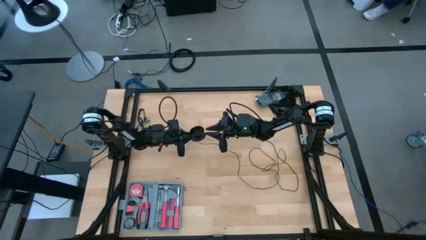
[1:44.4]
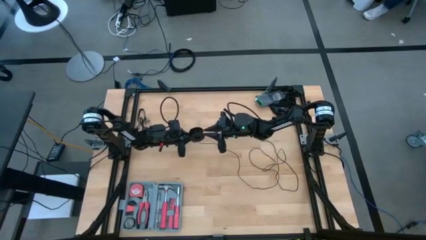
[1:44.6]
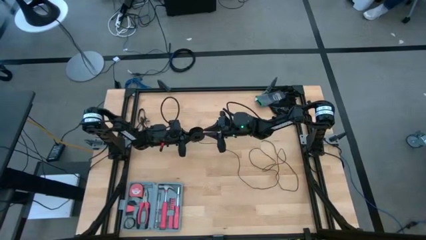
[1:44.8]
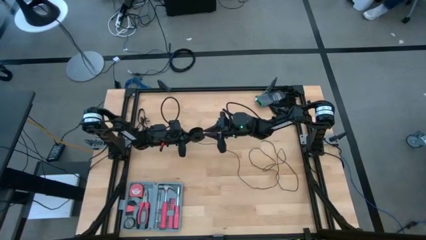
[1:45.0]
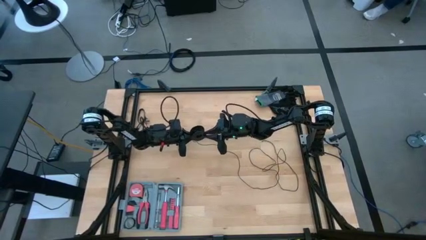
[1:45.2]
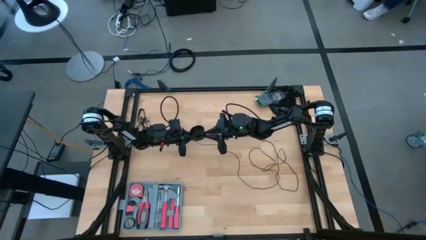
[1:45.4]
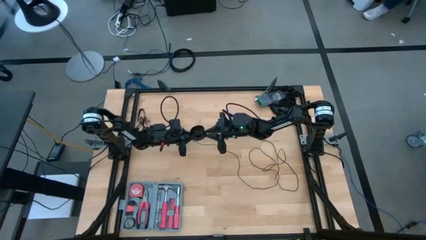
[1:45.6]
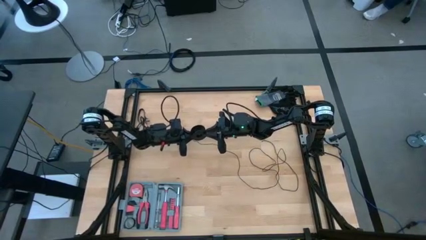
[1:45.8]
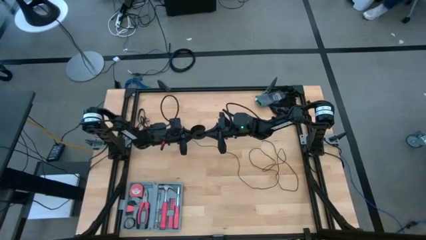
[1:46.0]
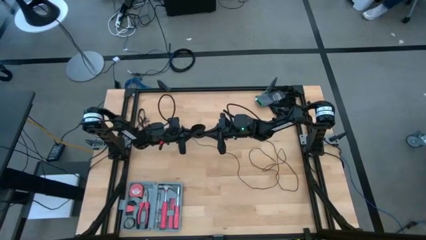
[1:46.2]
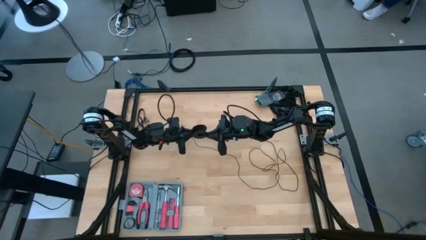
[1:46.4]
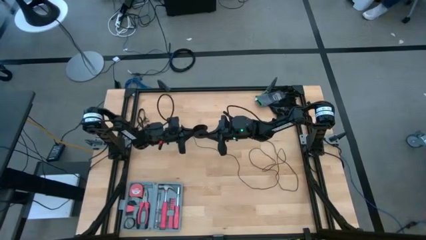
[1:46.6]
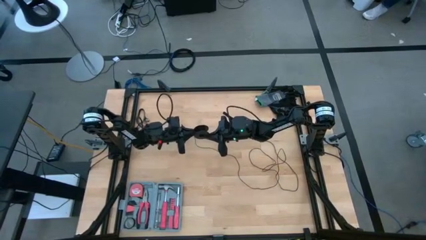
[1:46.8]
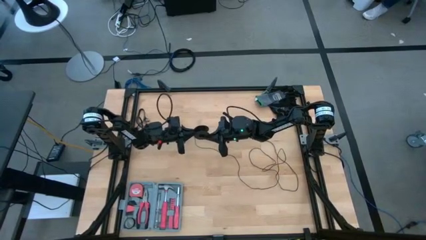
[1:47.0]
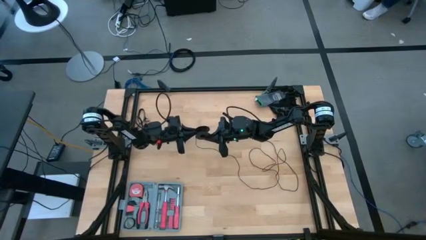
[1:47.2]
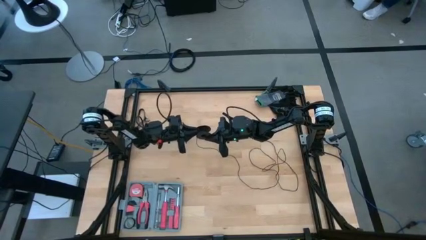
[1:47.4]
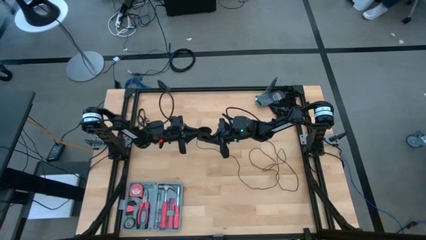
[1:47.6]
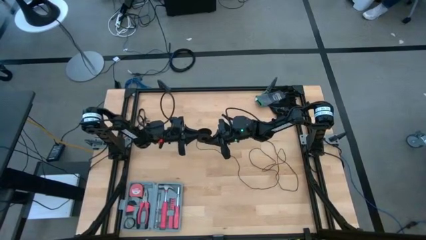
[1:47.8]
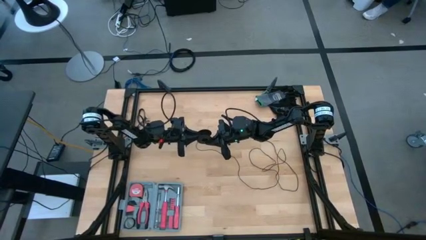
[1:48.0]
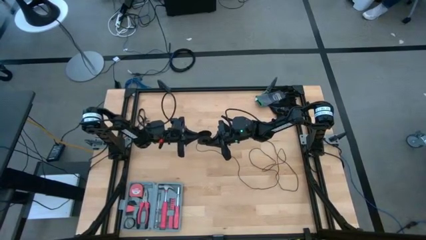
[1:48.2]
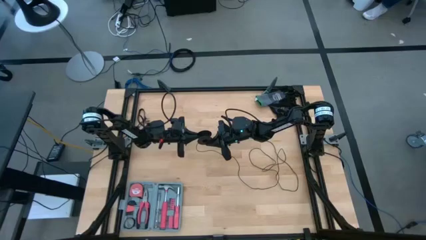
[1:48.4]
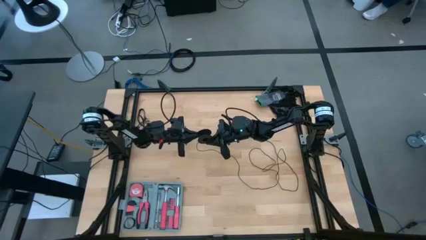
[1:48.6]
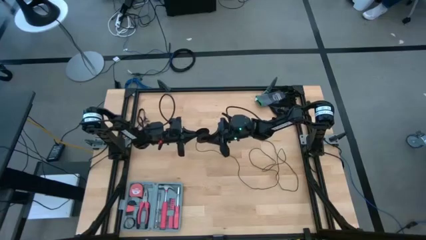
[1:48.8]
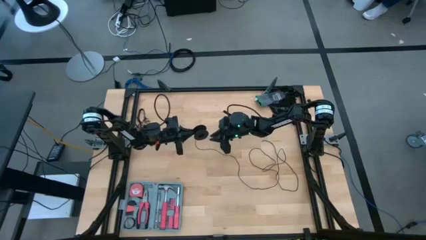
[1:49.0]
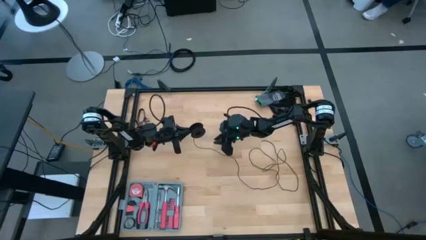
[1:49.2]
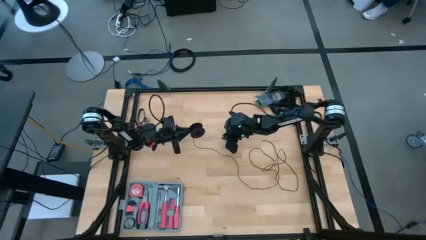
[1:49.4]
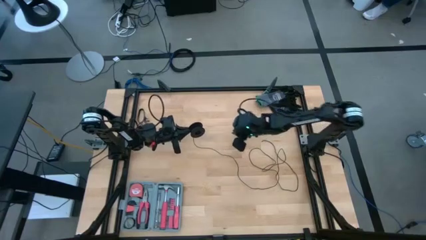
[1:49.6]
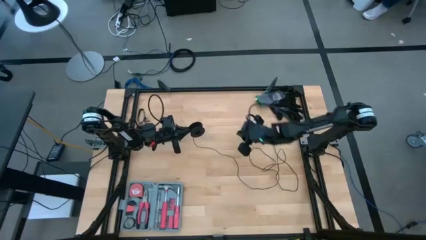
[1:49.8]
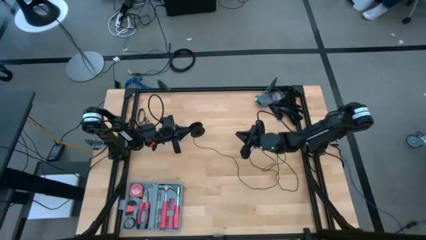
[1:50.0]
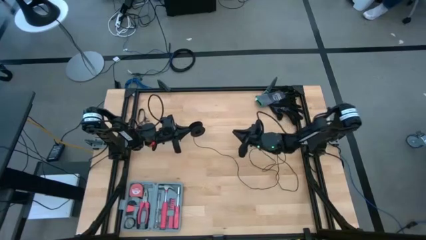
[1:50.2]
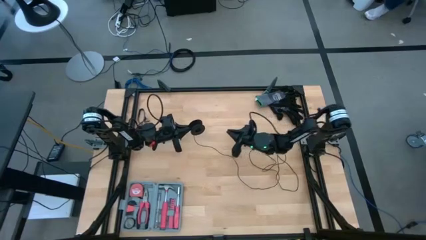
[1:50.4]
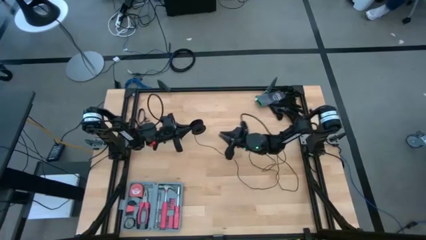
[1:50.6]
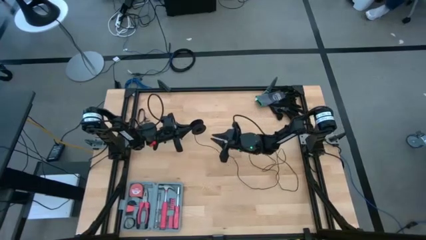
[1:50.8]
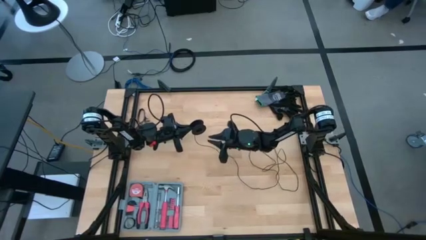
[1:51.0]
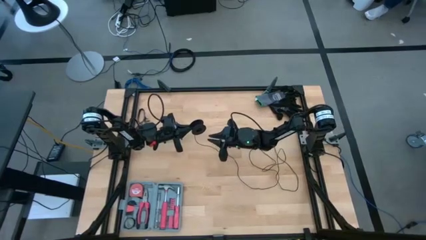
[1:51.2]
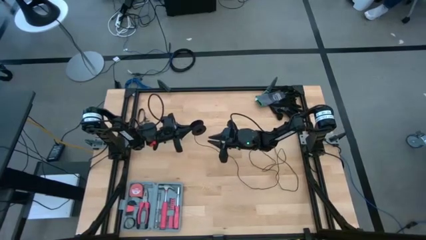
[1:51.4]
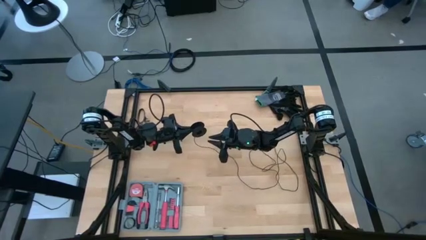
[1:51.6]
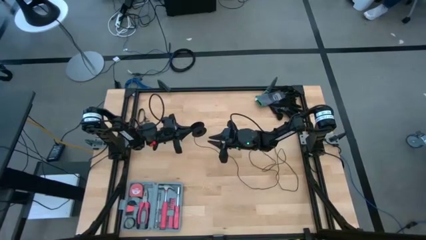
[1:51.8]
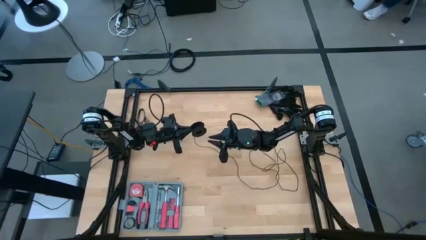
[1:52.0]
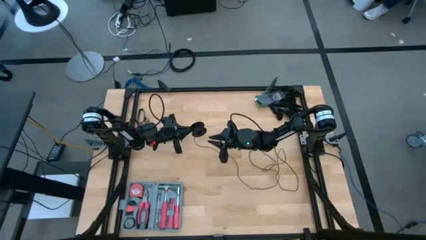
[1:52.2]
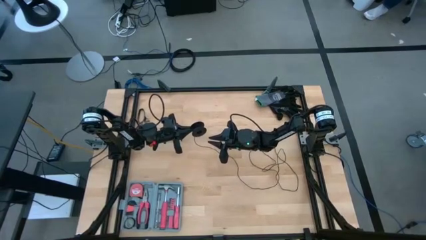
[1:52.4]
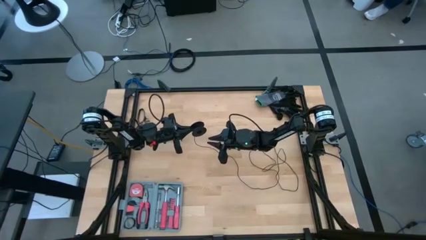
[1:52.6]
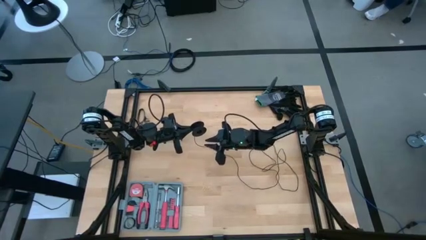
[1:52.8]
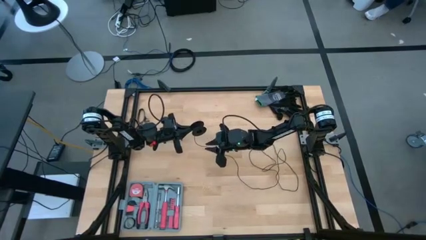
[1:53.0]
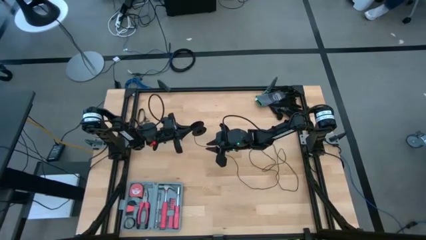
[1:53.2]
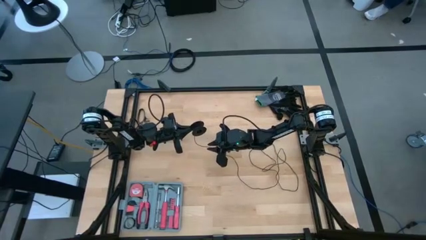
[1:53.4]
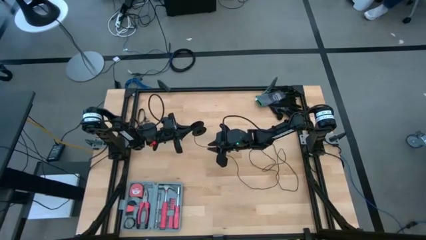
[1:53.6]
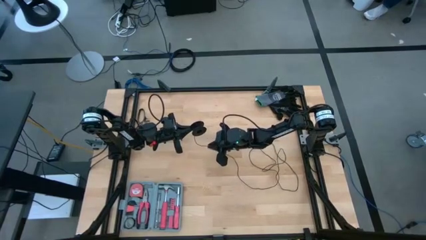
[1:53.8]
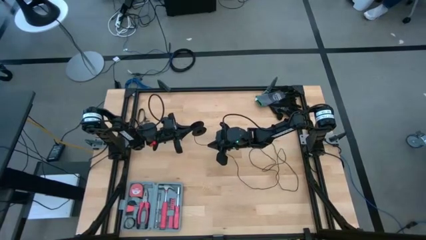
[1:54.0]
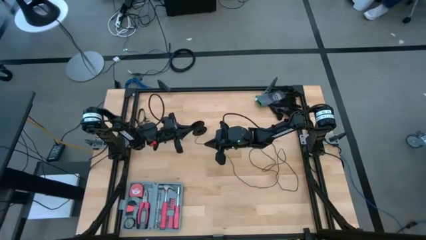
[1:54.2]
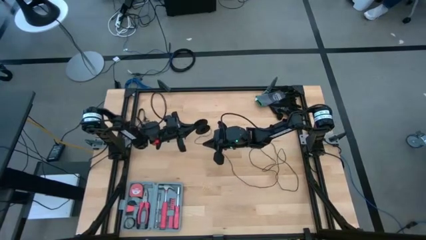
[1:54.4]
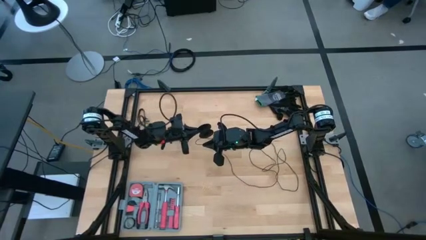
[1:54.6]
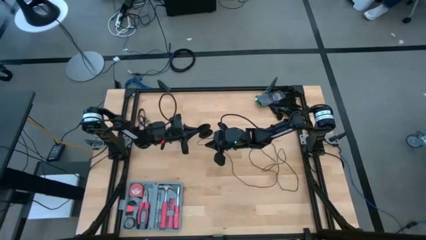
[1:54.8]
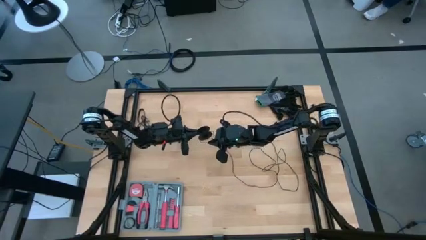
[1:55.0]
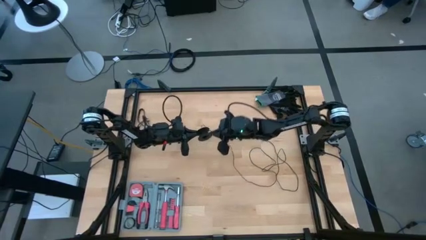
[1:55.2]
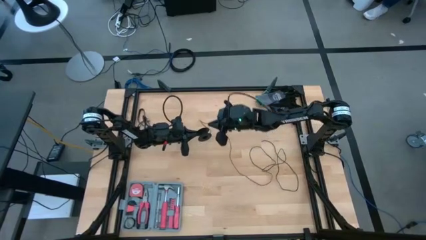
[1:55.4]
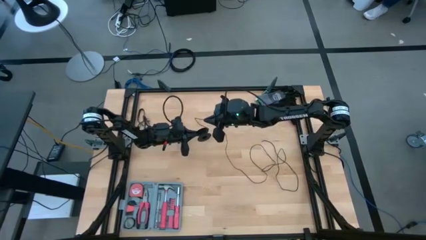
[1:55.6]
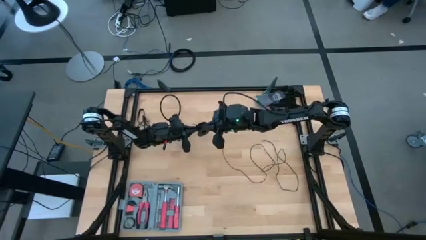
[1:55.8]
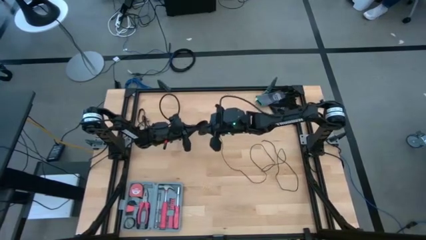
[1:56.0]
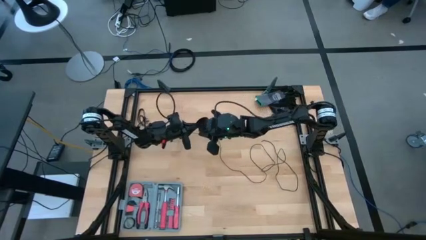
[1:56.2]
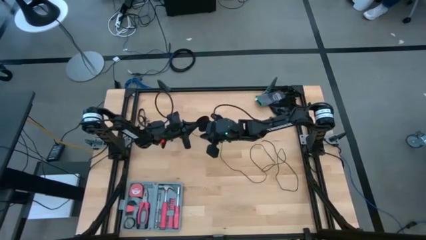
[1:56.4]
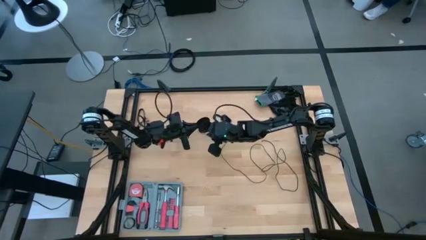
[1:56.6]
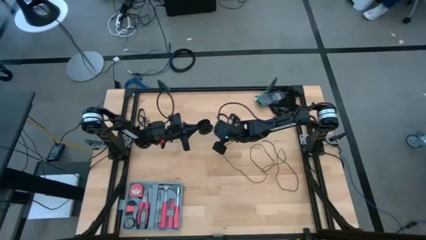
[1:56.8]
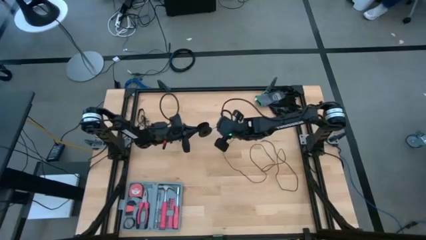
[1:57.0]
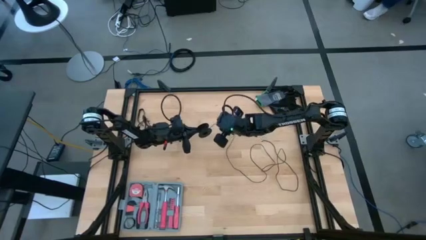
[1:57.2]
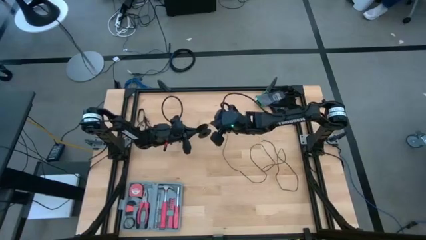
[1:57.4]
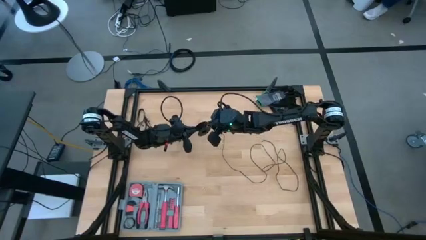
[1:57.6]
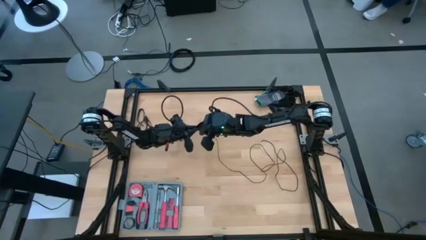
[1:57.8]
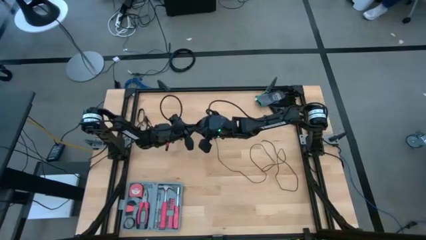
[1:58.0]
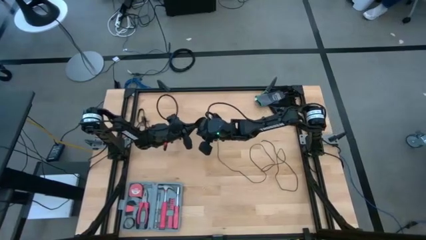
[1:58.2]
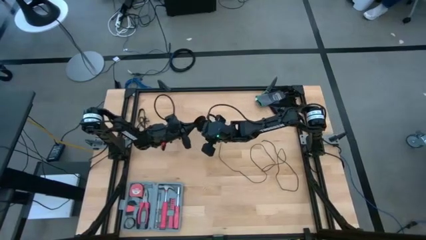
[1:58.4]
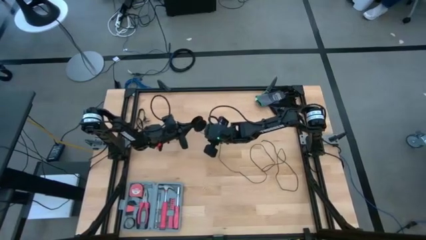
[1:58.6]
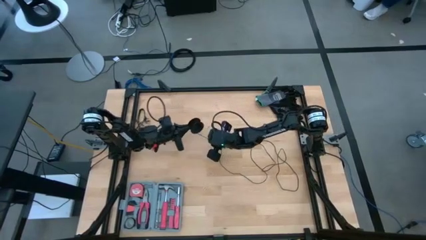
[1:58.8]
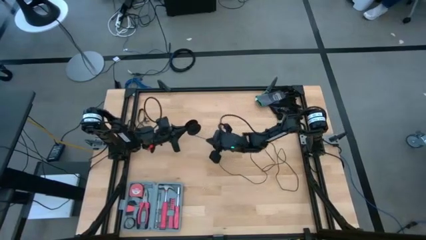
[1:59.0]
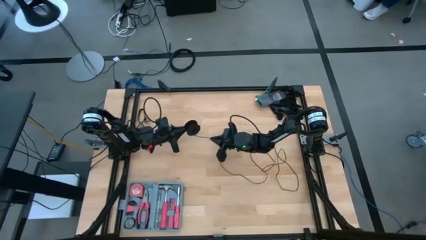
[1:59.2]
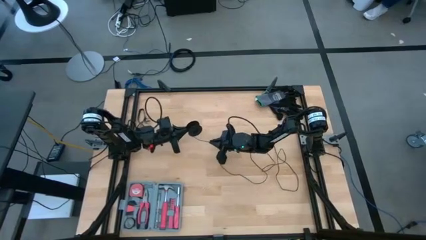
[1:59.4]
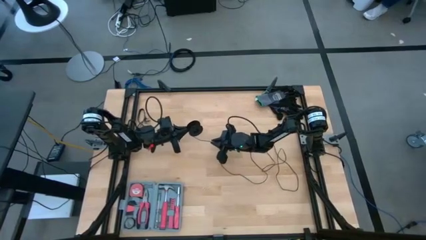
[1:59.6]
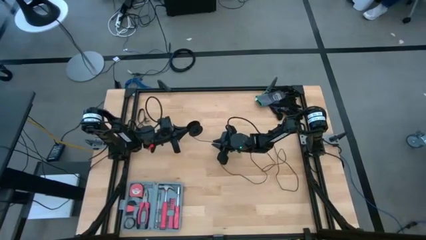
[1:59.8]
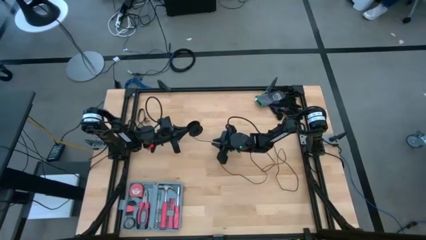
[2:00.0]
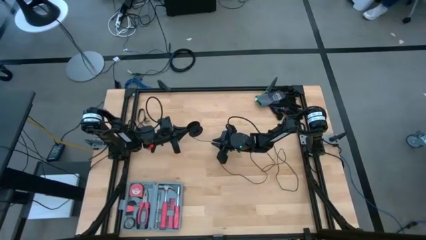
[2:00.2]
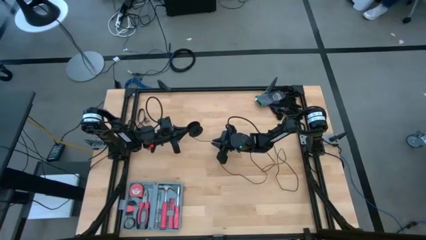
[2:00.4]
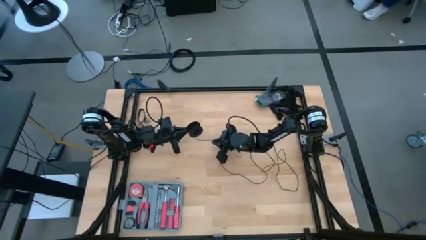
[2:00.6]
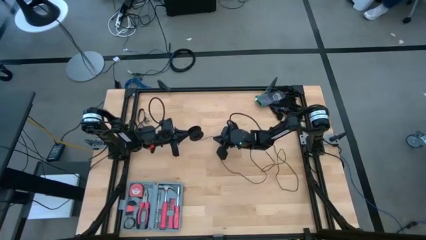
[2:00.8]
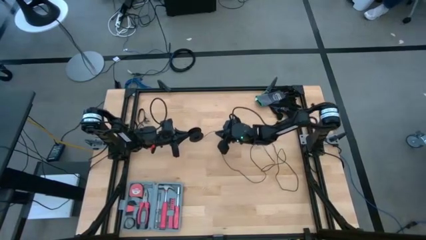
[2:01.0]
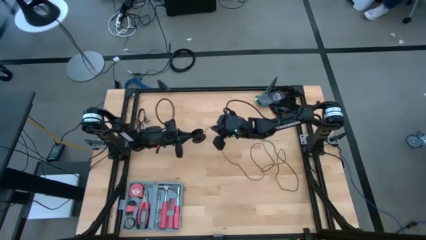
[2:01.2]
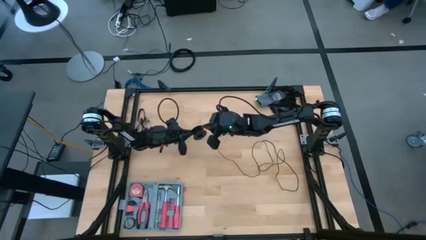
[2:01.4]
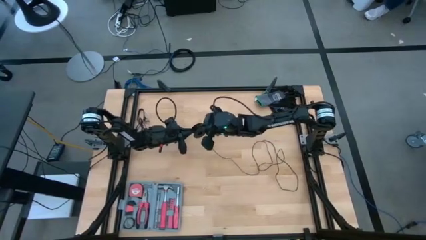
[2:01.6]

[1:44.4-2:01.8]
Task: Coil cords
Coil the black wire on the spool
